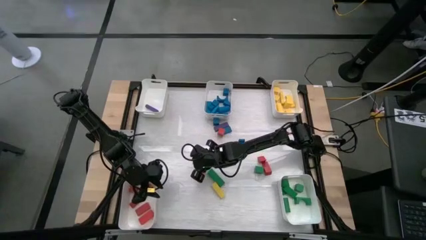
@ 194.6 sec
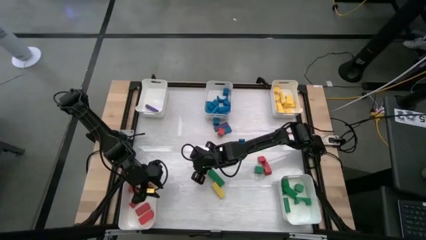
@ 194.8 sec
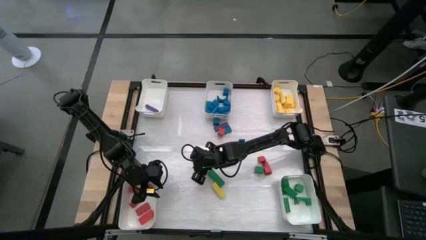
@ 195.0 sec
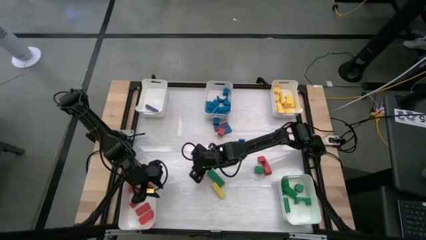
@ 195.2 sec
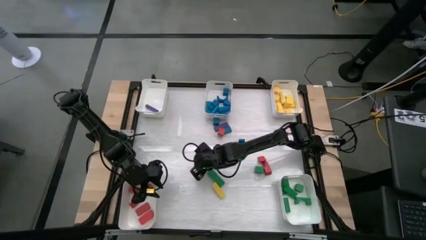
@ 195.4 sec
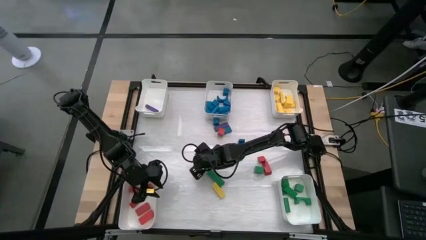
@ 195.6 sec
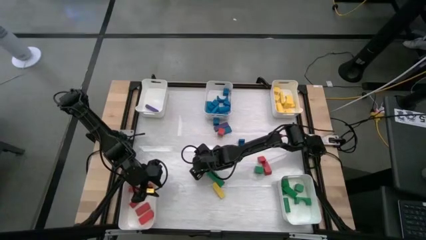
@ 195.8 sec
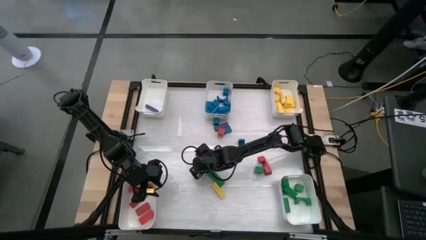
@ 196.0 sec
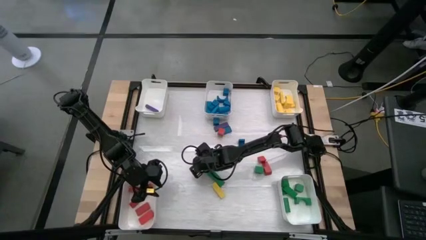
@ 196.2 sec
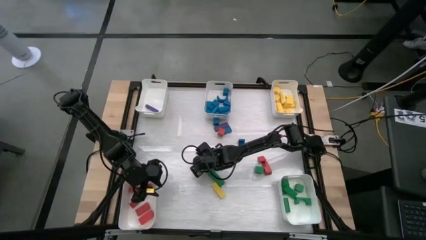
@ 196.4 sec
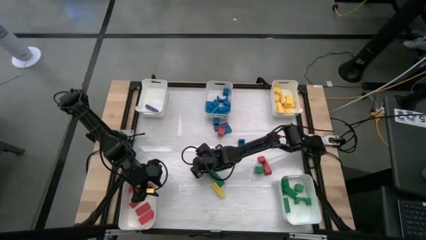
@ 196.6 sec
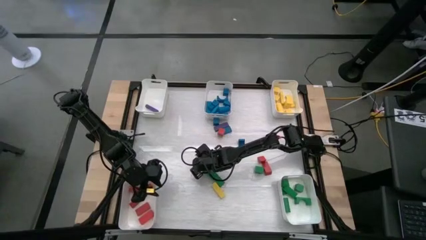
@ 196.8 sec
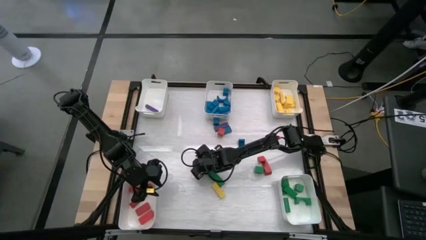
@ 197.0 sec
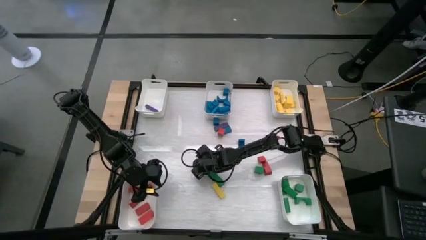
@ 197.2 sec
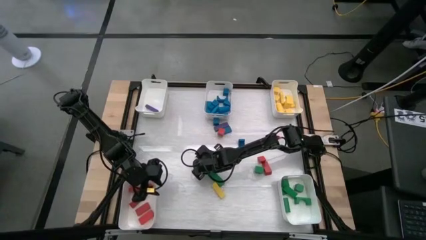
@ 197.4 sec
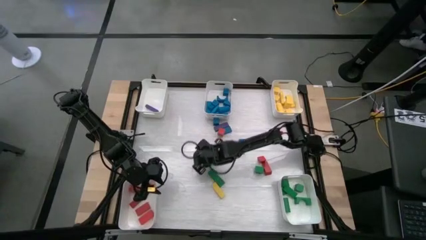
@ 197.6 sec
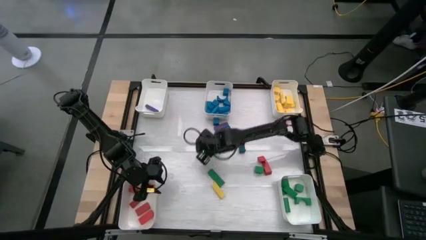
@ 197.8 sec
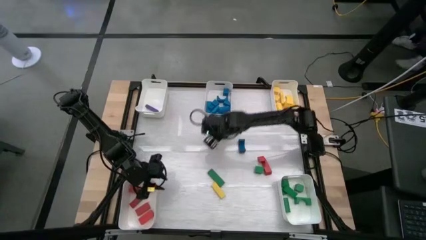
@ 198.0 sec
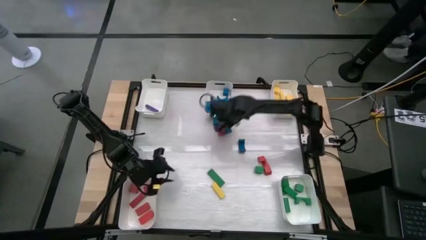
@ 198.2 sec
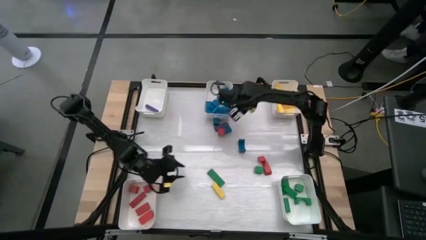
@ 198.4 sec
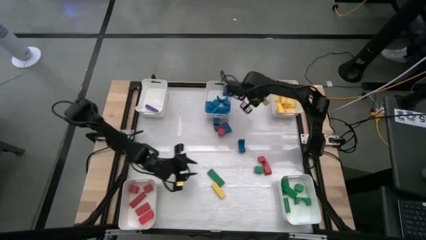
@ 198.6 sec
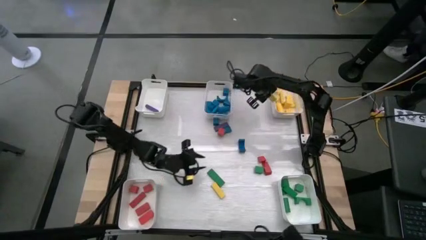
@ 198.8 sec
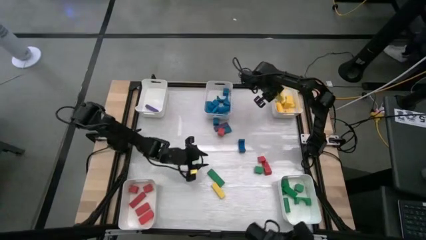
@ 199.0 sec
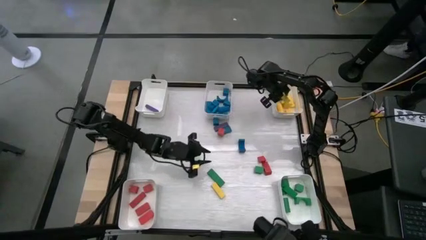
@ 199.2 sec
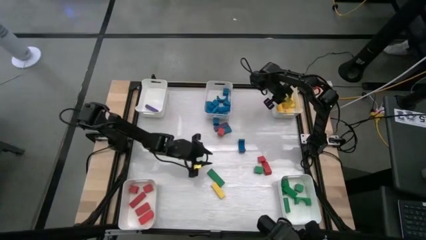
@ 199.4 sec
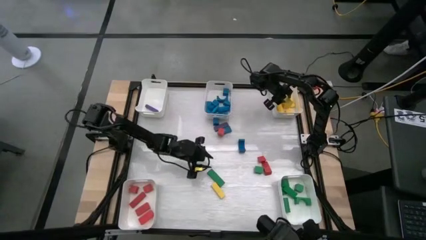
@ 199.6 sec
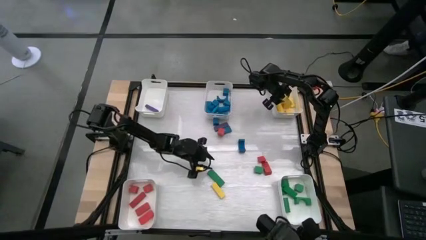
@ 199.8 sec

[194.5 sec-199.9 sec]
Task: Sort blocks
Put the yellow block into the top right white bin

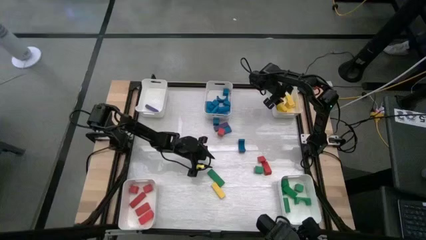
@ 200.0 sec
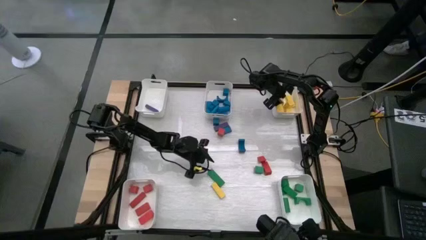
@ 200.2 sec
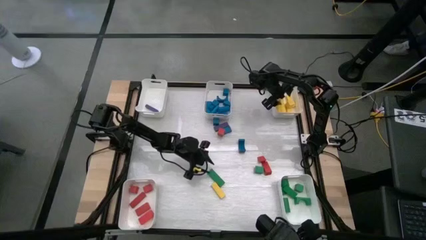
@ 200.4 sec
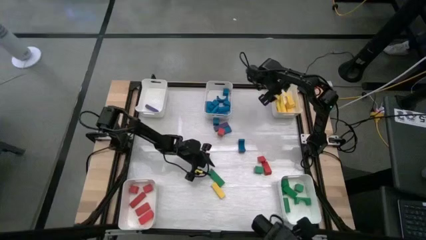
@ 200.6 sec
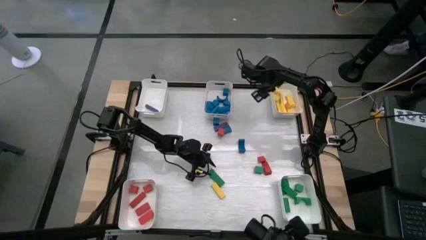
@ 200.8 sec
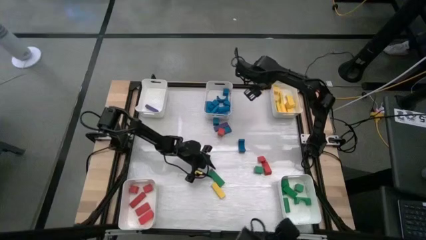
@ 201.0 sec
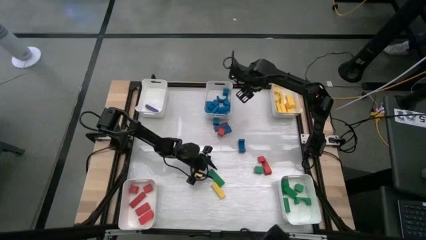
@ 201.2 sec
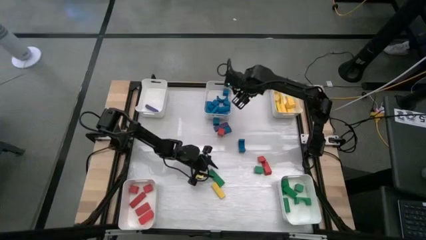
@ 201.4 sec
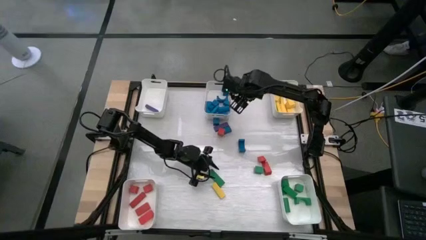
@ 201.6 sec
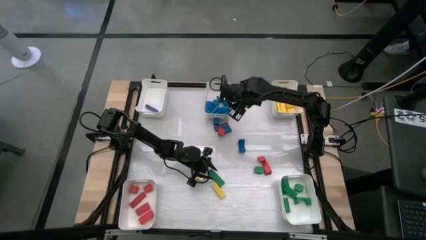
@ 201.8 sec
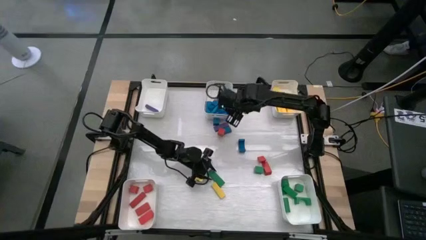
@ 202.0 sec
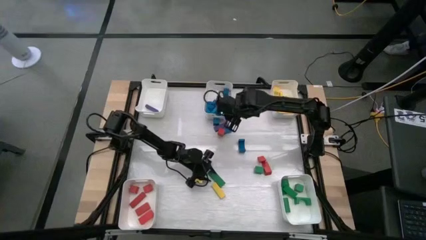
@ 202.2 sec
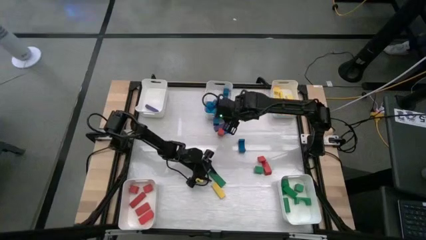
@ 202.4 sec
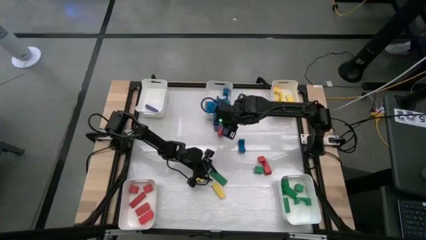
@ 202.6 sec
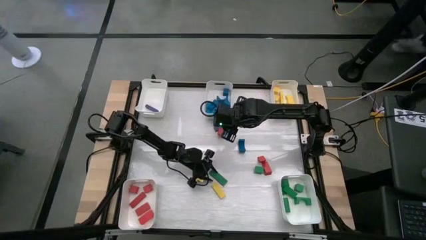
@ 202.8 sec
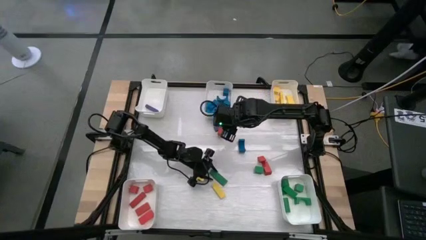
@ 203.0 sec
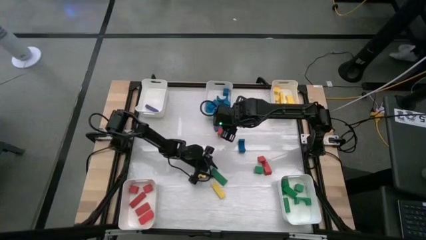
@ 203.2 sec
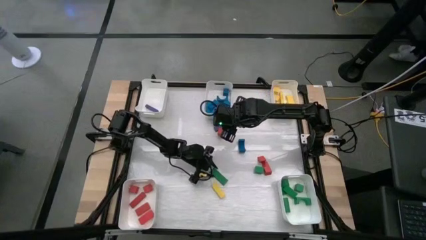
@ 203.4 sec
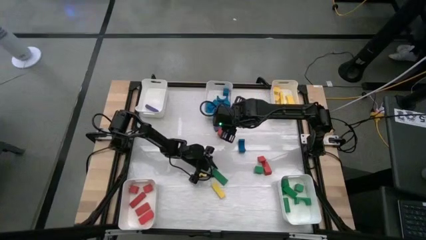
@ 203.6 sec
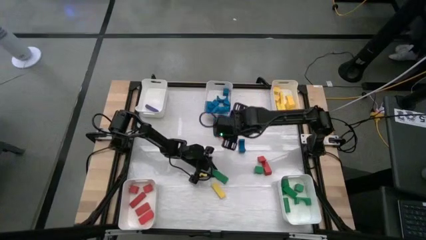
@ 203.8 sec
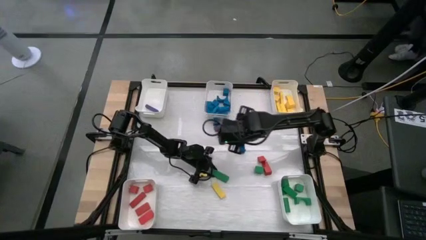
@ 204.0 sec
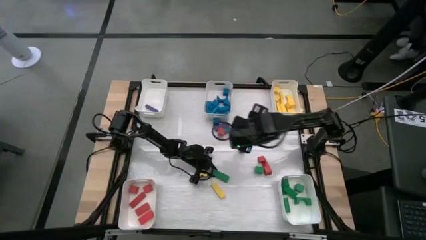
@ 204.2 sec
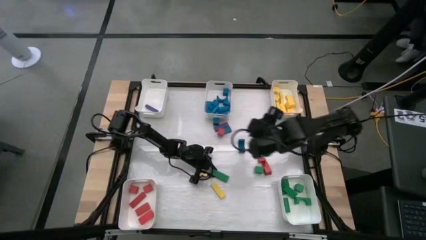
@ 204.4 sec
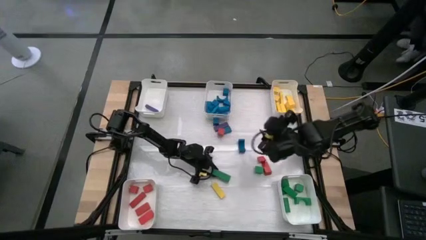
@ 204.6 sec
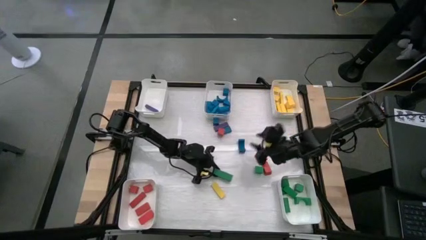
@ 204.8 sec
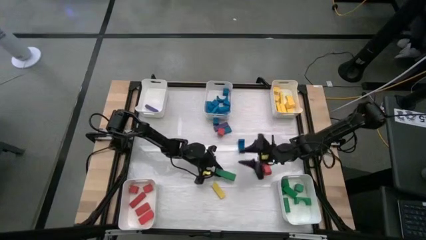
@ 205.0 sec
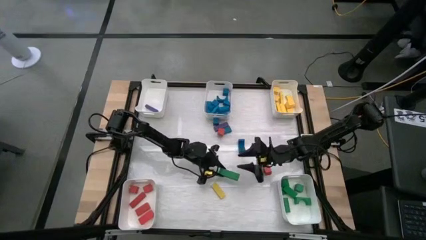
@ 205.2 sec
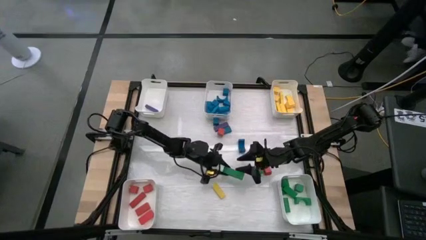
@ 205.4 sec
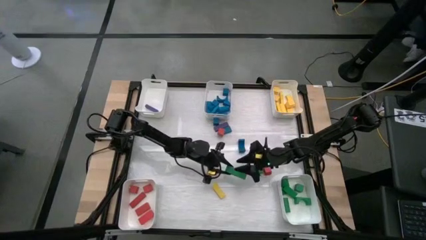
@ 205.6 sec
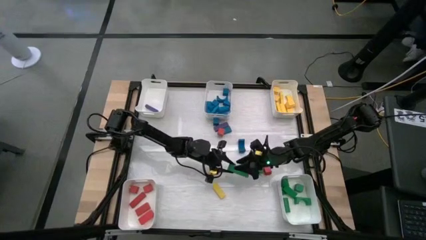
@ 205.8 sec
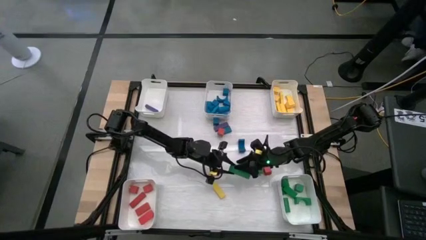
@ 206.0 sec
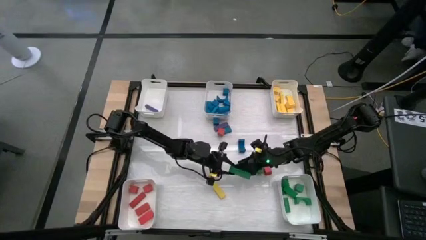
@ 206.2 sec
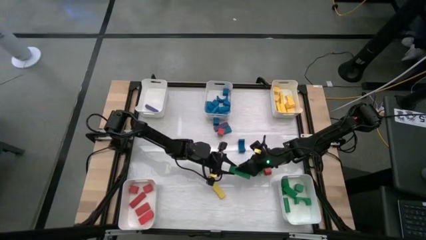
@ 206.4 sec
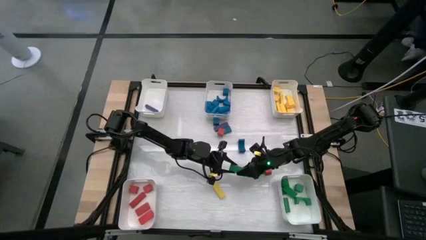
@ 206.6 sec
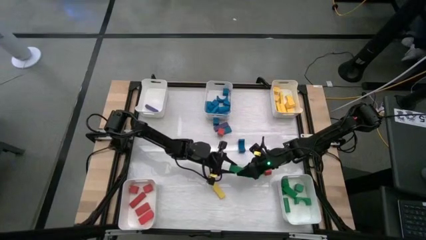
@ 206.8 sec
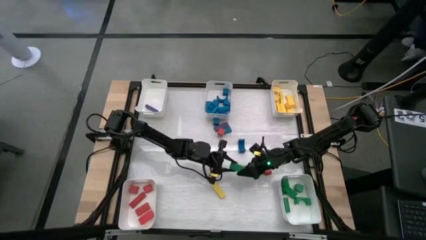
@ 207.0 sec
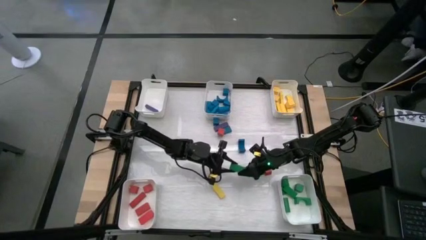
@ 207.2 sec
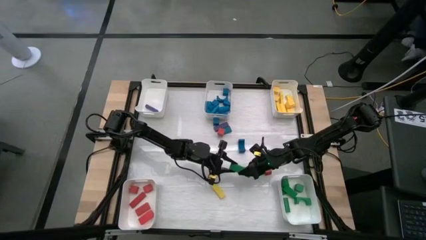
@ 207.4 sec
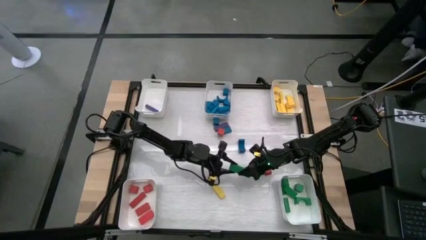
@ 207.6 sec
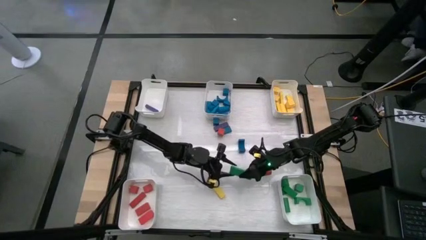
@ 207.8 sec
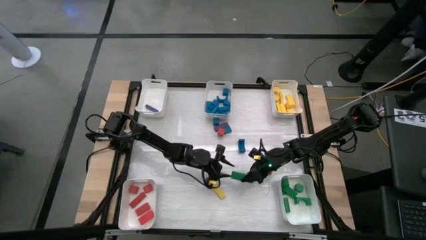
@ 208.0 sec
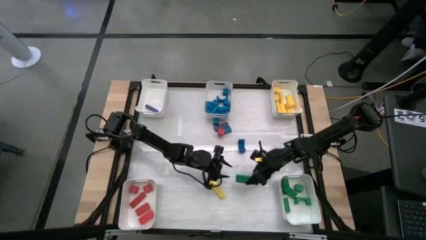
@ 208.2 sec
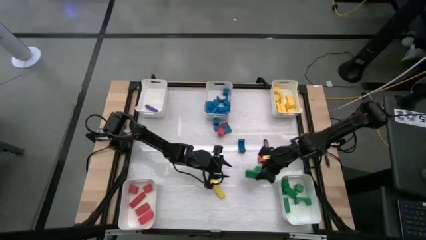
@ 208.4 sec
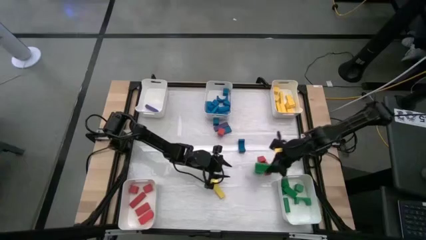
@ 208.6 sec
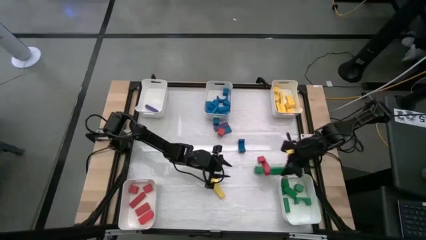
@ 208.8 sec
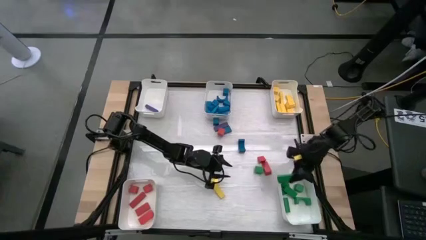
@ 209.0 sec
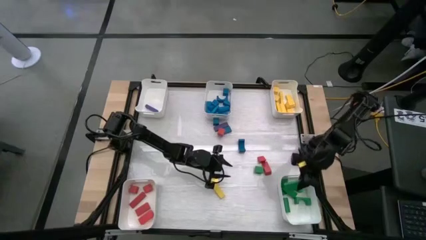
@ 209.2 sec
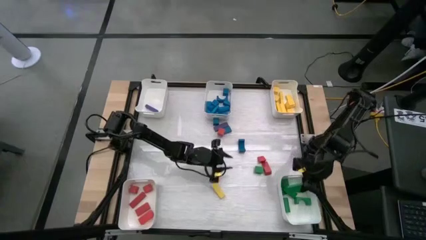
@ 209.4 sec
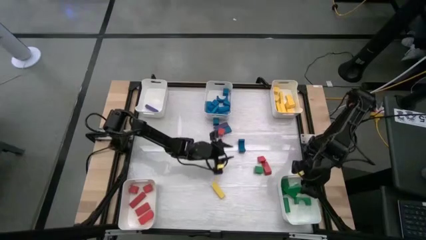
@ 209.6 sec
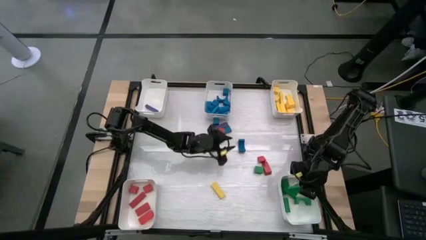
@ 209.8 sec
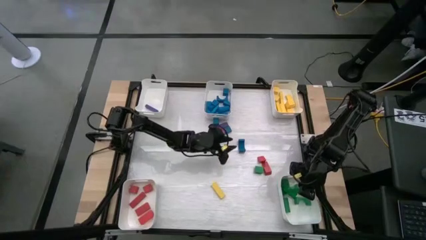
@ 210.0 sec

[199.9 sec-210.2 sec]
Put the green block into the bottom right white bin

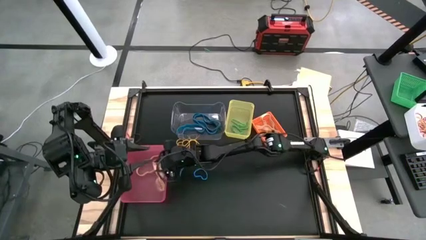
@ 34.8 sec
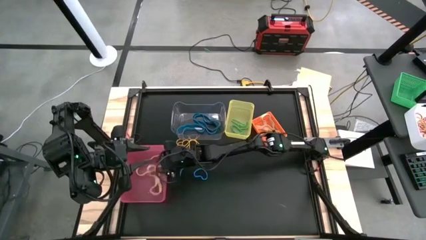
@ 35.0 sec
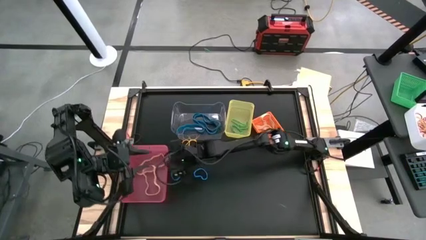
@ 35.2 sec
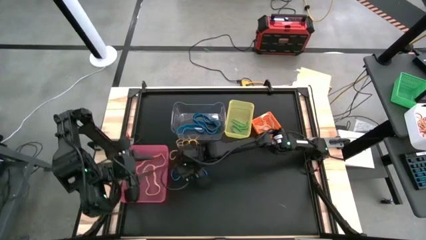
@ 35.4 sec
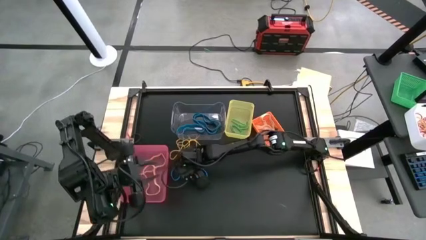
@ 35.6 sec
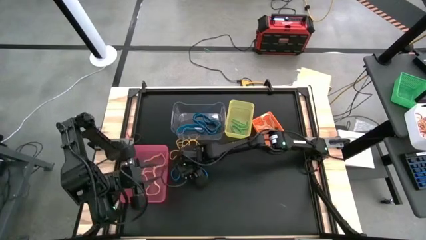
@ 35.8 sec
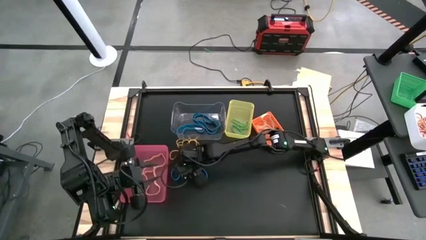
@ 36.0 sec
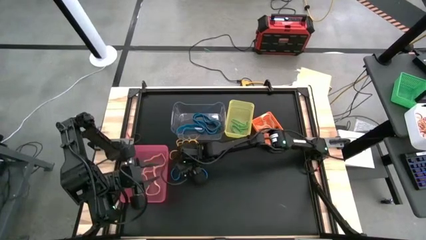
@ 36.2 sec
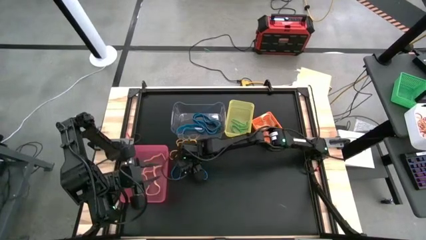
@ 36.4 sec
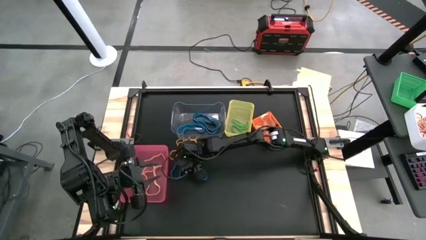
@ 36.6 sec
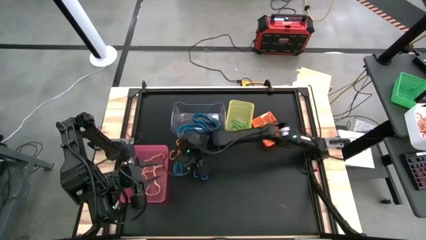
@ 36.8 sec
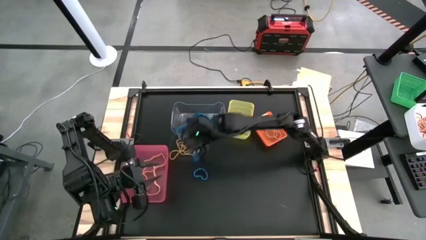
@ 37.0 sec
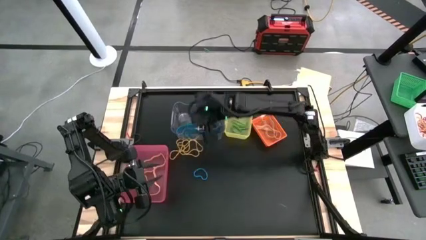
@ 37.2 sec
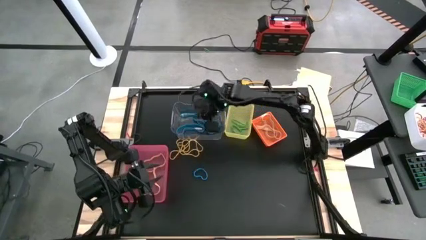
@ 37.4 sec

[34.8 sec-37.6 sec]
Task: Sort rubber bands into baskets
Put the blue rubber band into the transparent bin
